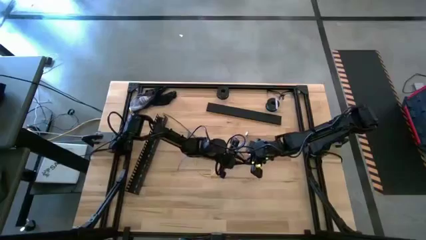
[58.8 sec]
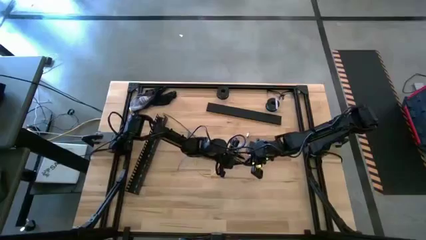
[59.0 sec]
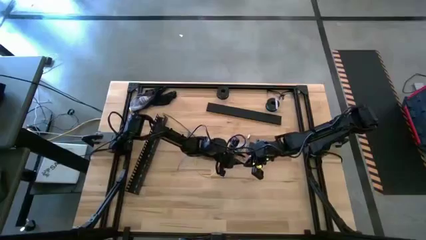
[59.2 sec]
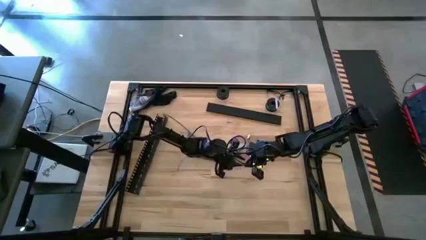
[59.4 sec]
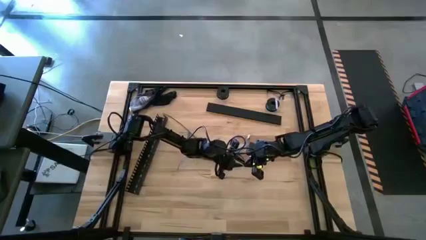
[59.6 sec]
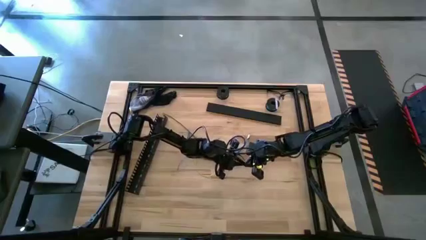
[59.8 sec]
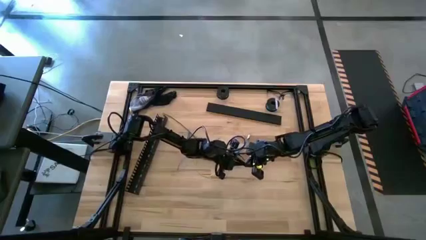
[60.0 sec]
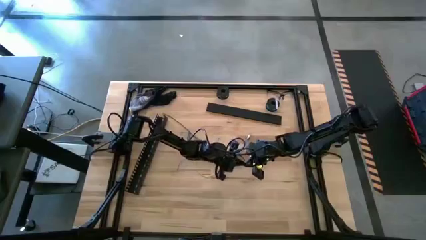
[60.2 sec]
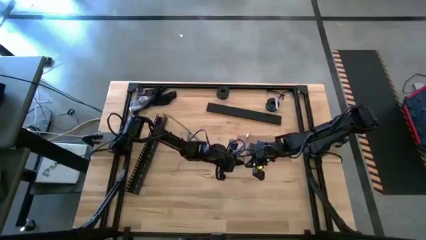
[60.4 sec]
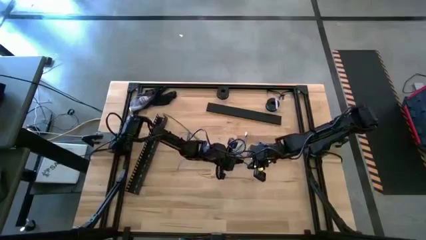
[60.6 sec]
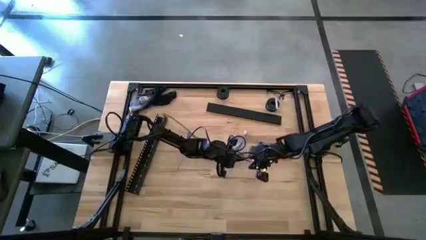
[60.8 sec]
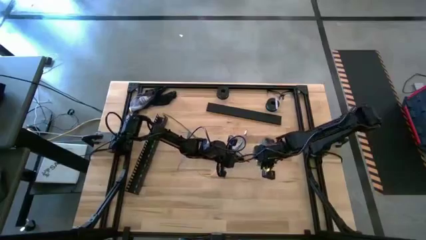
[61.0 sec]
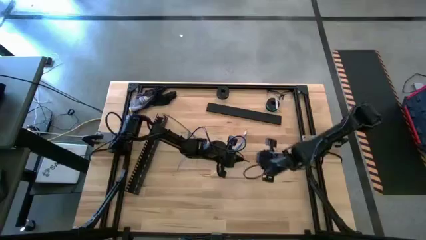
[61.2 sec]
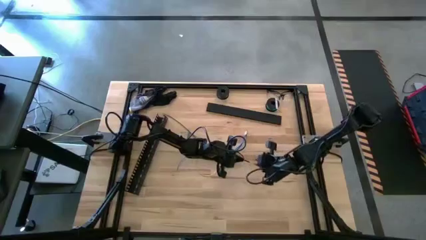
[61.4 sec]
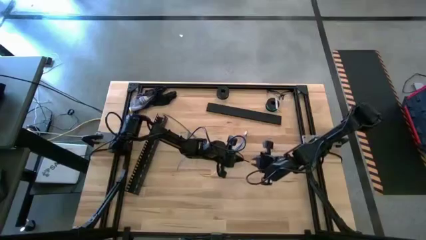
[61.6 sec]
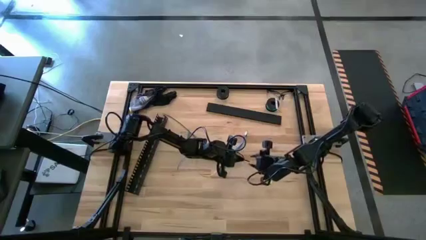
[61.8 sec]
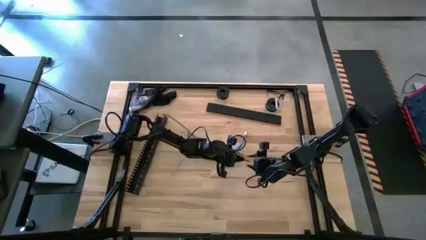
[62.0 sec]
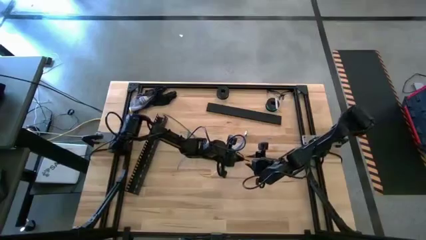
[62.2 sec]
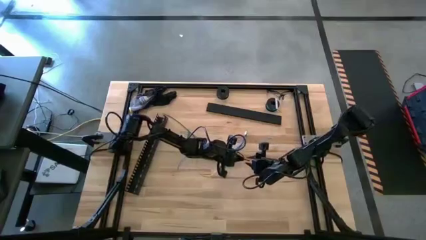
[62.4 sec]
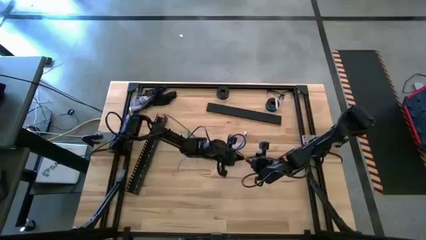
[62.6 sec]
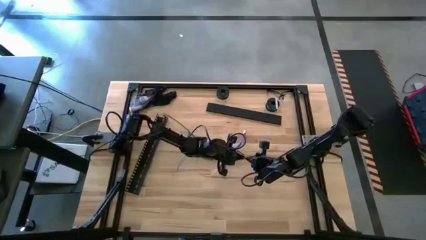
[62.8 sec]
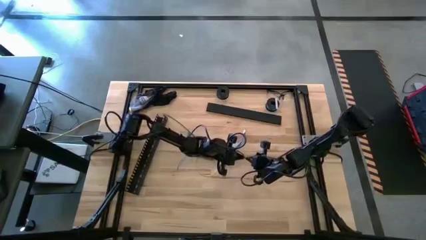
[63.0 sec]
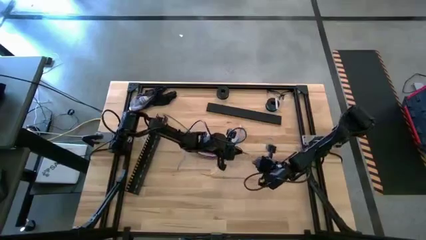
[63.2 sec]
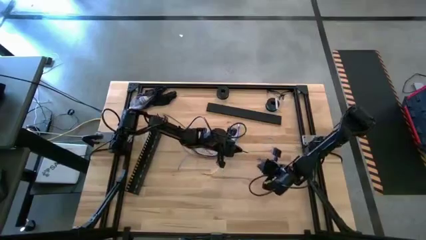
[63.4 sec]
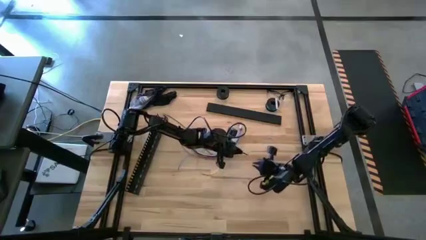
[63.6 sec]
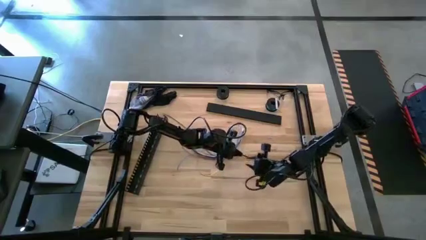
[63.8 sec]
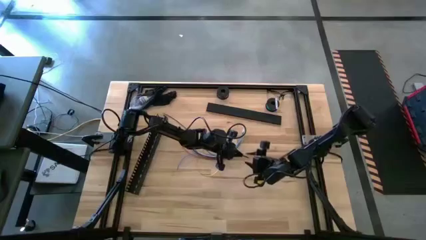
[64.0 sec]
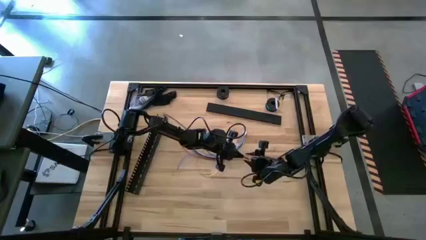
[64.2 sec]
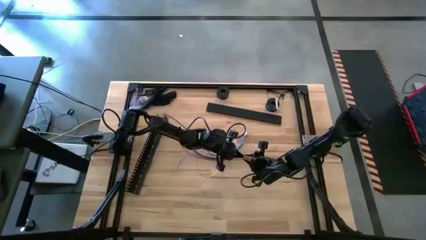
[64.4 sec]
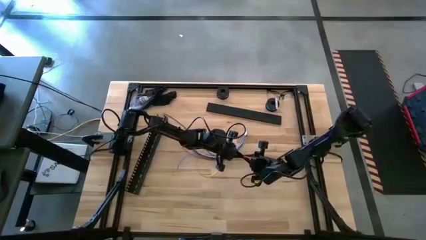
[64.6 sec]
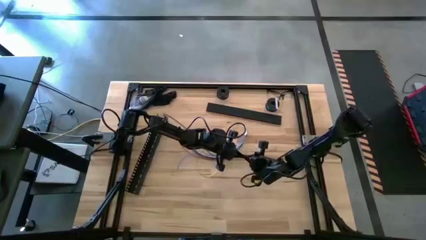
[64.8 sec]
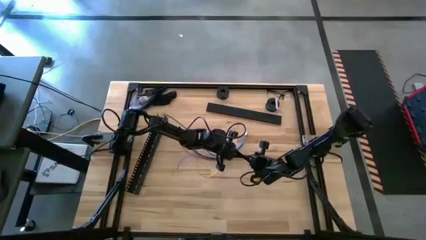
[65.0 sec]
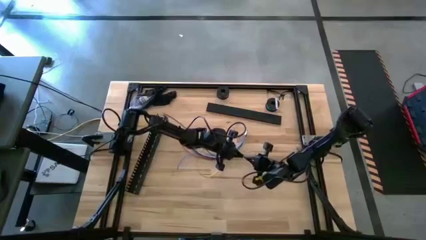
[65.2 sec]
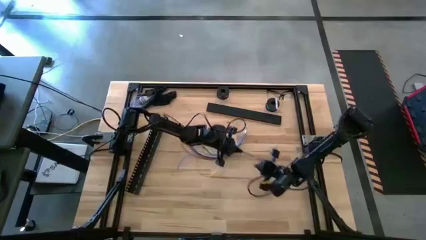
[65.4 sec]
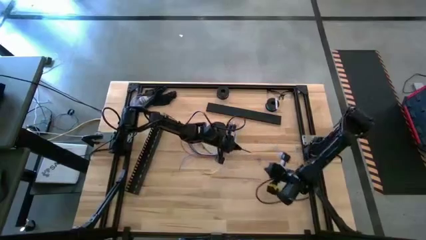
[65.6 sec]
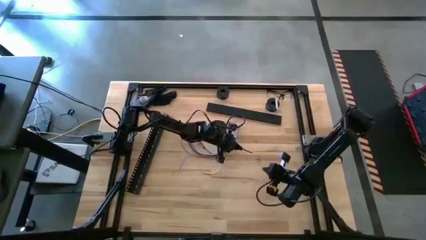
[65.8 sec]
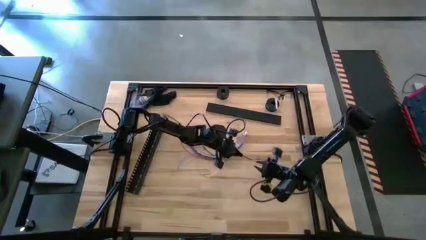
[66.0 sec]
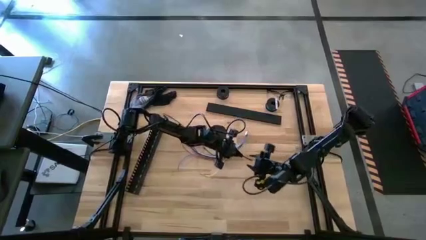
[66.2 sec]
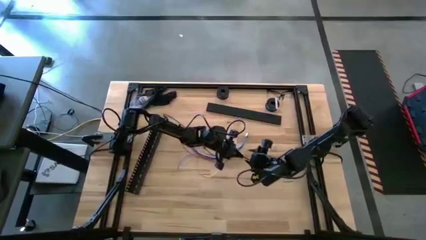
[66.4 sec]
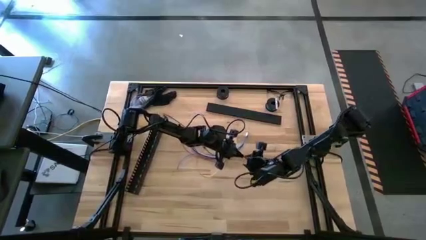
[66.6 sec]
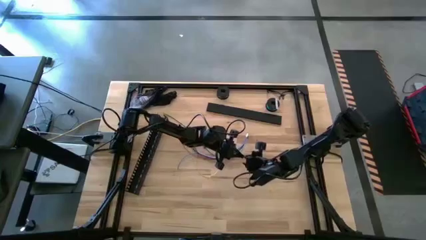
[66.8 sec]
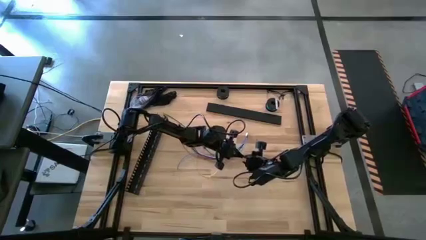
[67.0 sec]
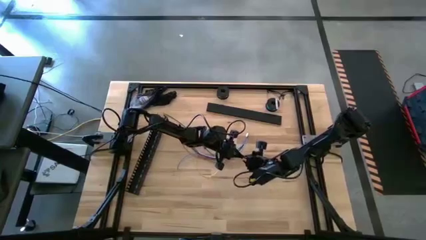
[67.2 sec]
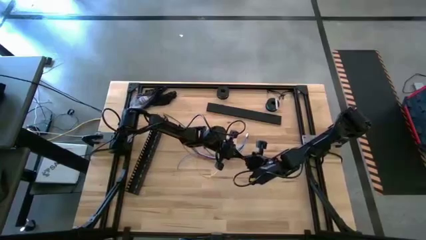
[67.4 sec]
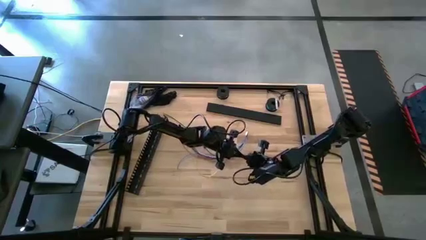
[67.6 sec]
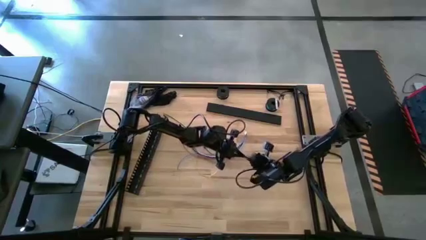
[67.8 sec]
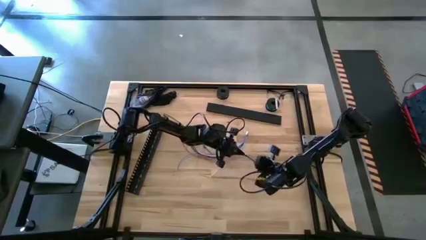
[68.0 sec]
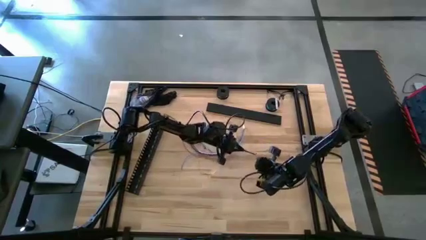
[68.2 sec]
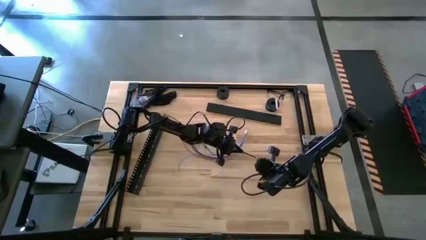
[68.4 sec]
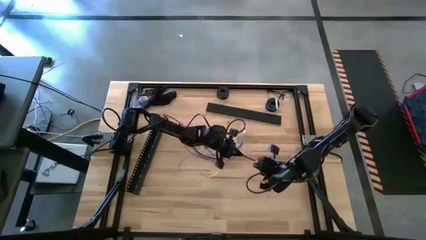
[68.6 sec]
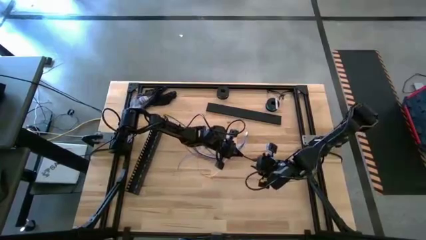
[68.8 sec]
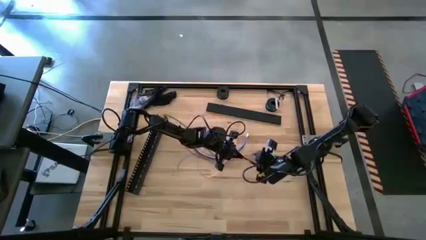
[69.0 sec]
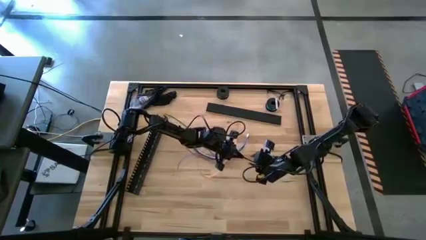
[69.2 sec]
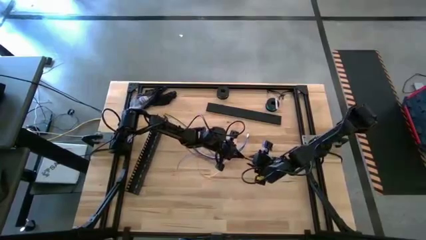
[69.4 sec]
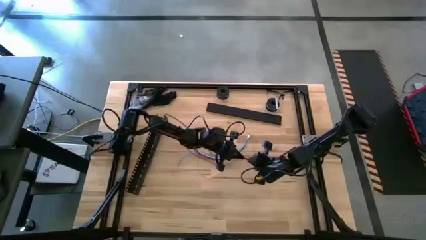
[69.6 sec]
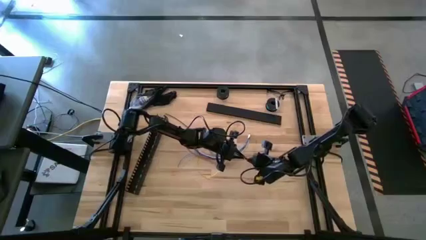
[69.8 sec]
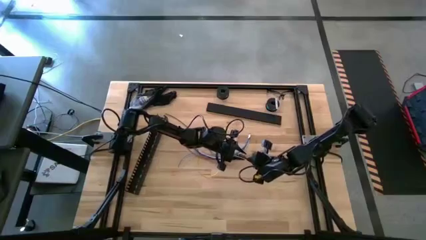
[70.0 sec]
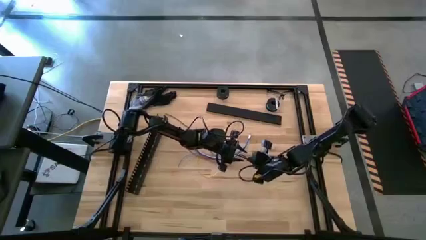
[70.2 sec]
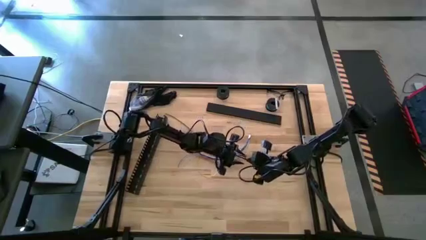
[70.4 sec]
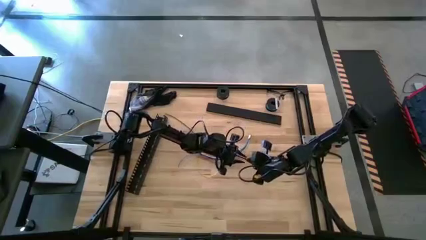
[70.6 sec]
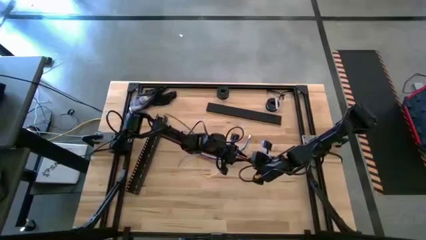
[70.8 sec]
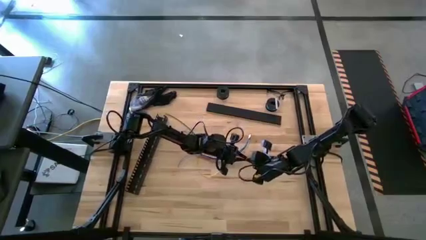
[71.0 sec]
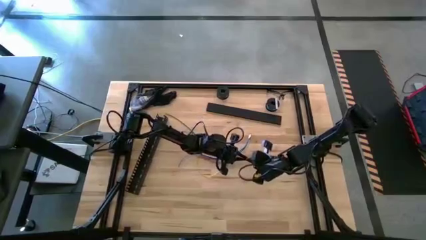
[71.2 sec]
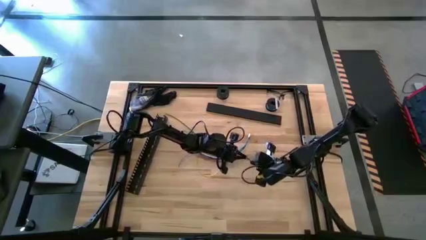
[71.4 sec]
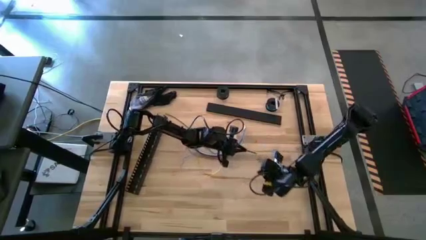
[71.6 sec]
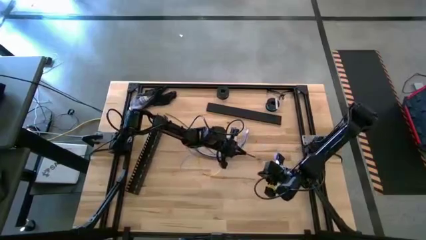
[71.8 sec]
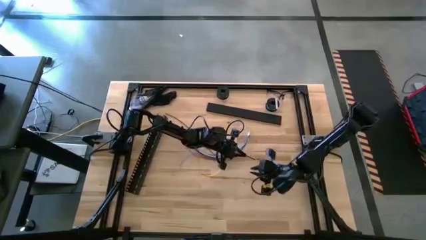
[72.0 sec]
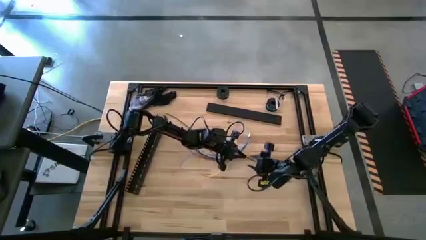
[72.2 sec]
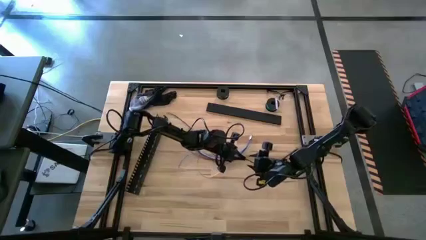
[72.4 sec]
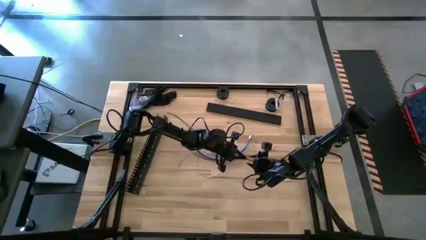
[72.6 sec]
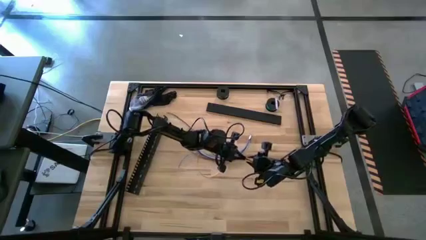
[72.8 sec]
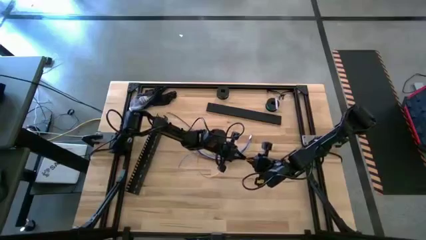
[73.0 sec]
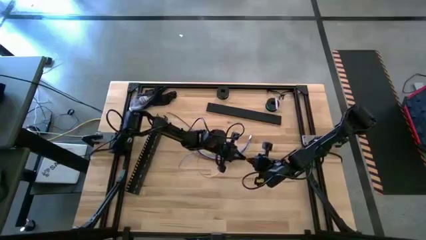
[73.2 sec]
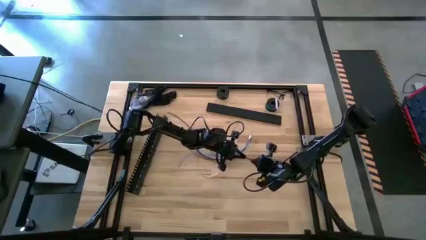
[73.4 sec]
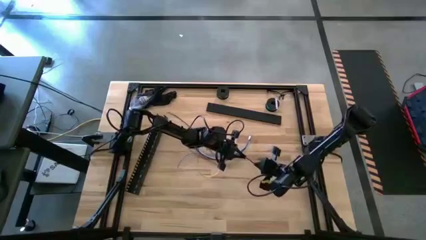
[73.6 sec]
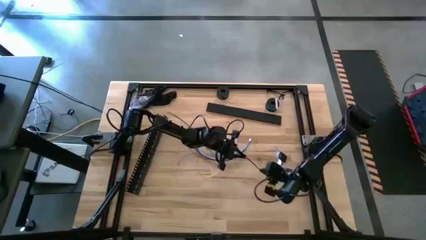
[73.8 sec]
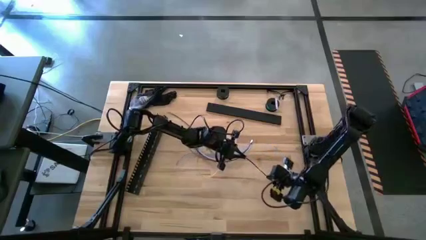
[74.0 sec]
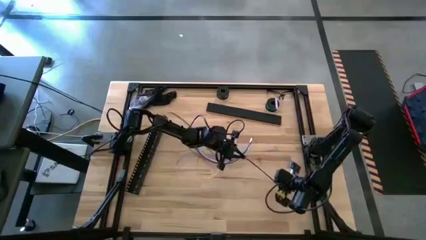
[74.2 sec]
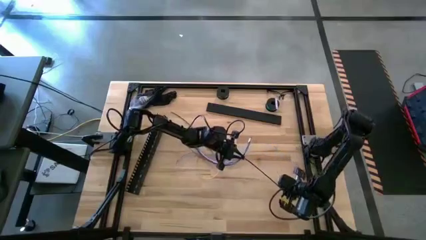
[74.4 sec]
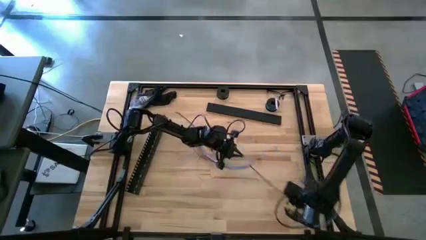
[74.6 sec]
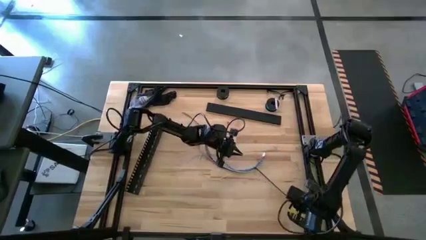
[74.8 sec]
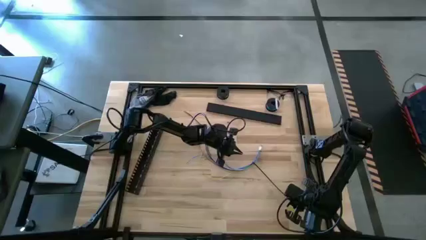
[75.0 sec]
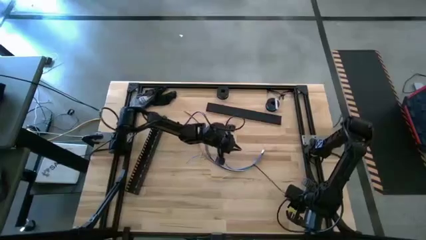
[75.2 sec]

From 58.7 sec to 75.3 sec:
Task: Ziptie cables
Insert the right cable zip tie into the cable wires
